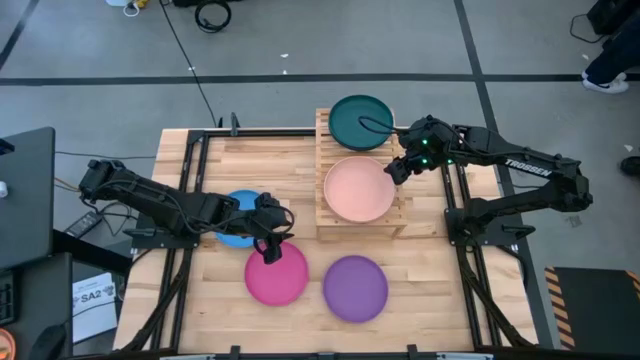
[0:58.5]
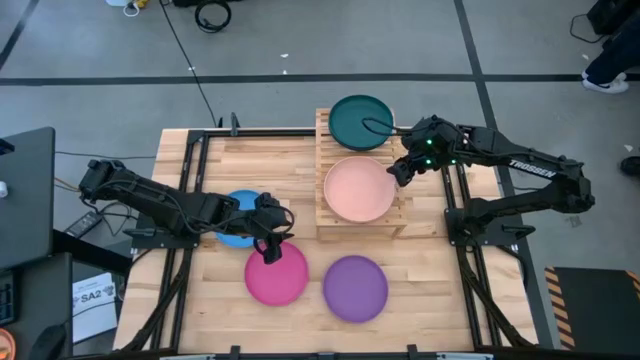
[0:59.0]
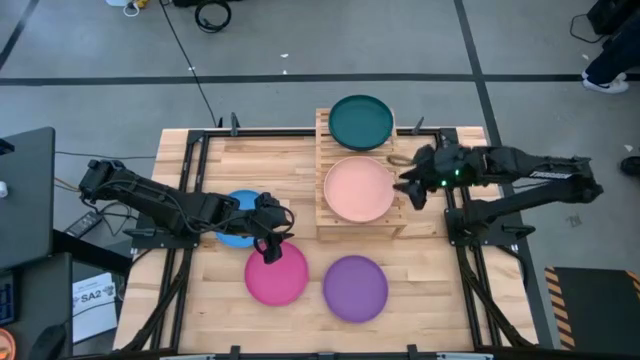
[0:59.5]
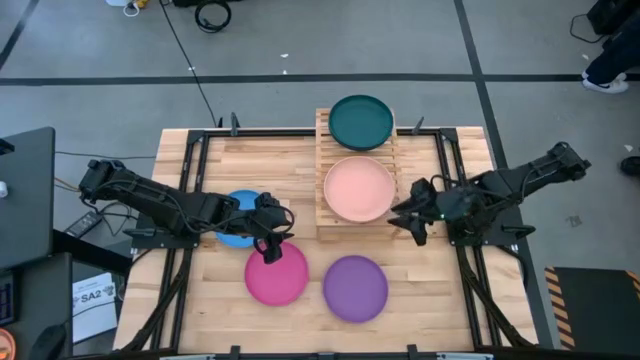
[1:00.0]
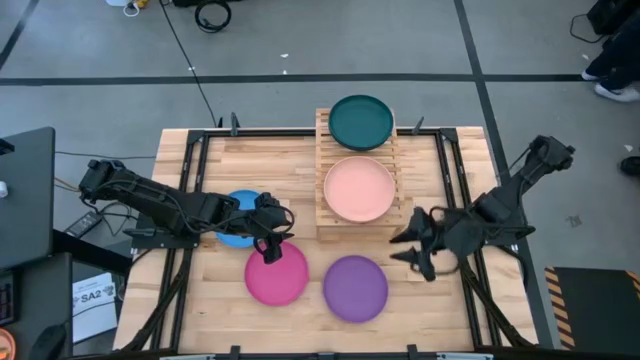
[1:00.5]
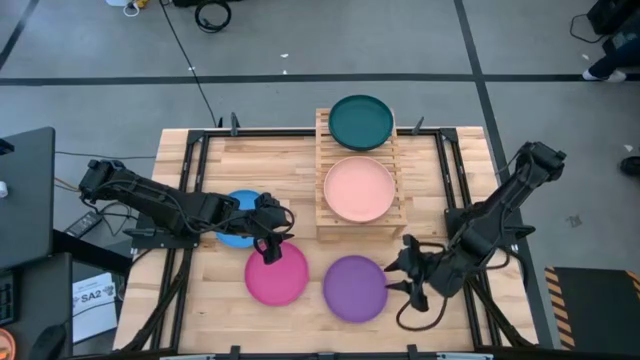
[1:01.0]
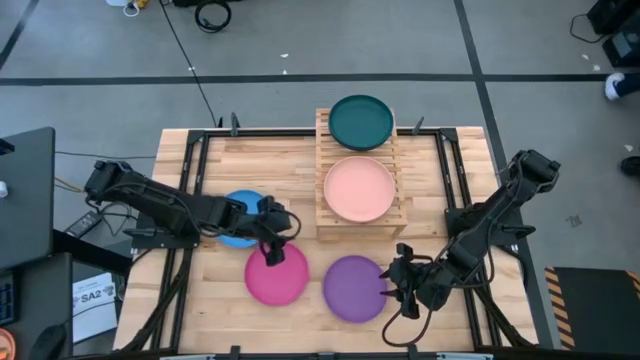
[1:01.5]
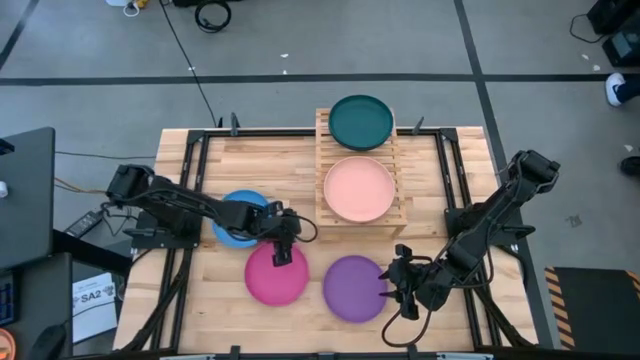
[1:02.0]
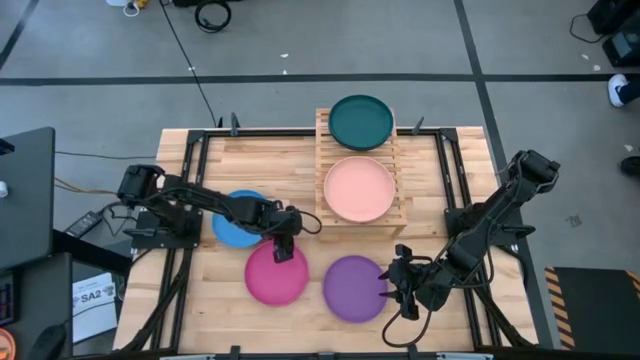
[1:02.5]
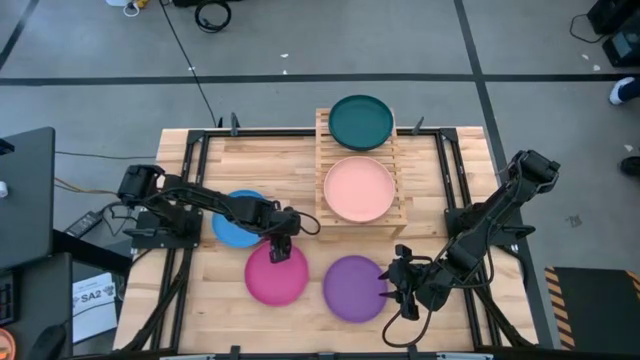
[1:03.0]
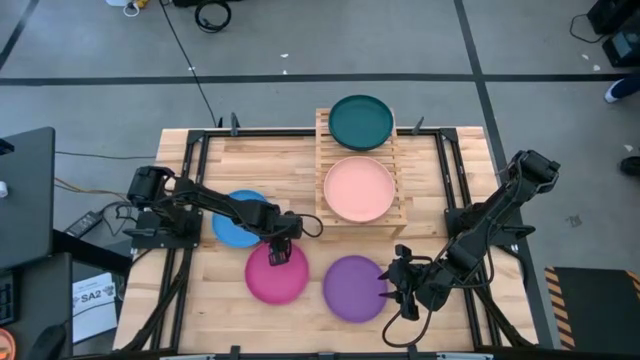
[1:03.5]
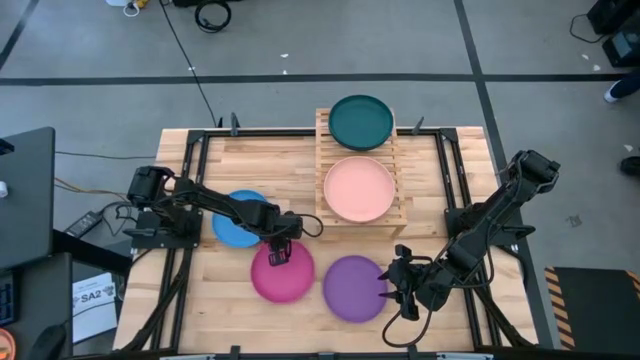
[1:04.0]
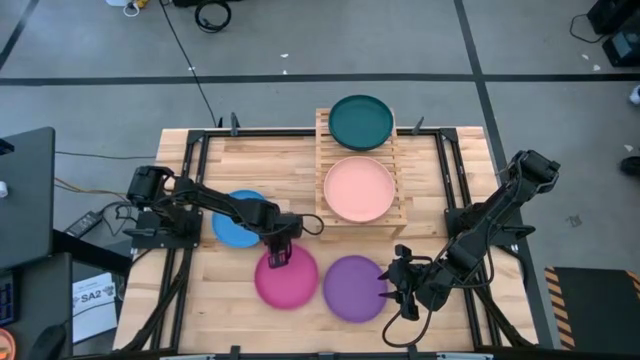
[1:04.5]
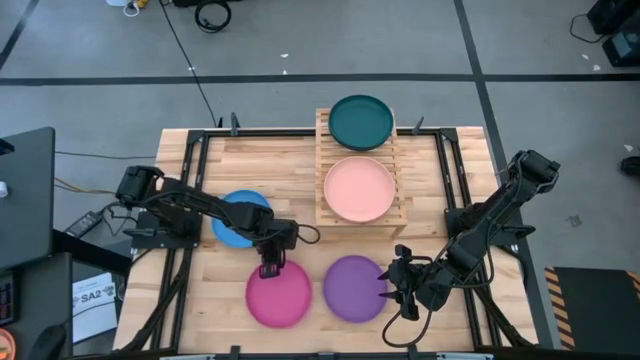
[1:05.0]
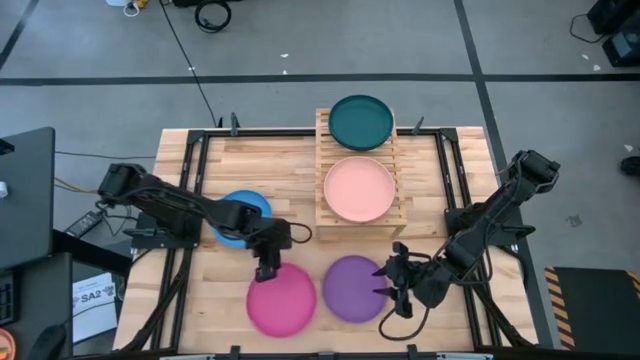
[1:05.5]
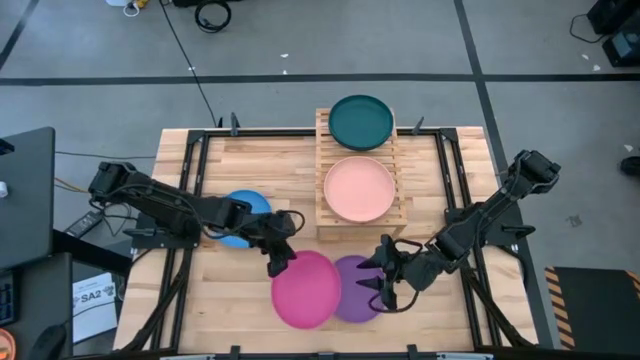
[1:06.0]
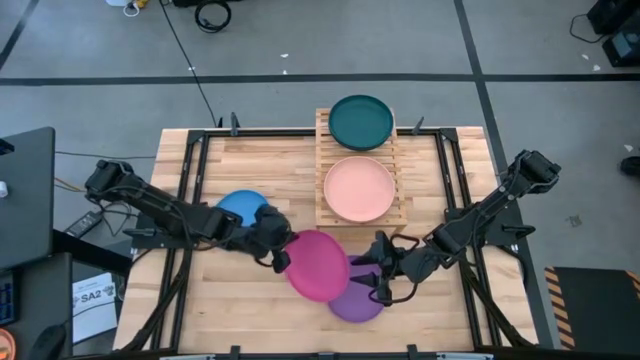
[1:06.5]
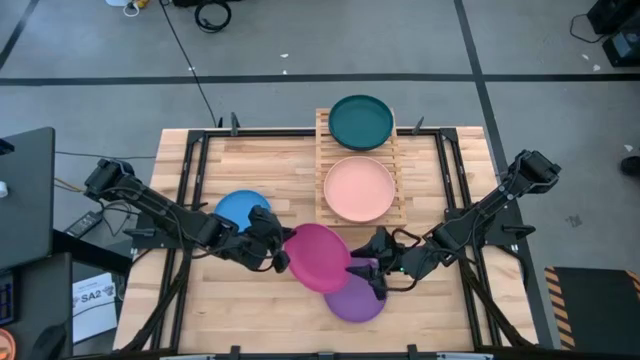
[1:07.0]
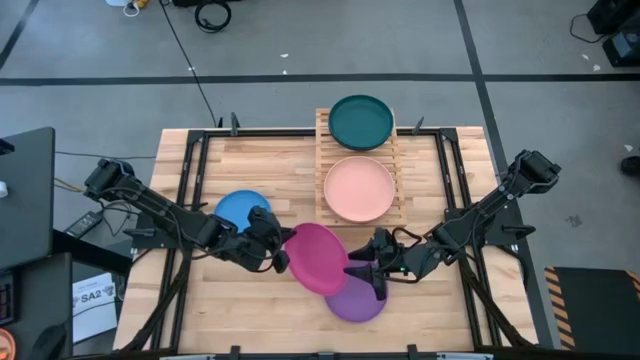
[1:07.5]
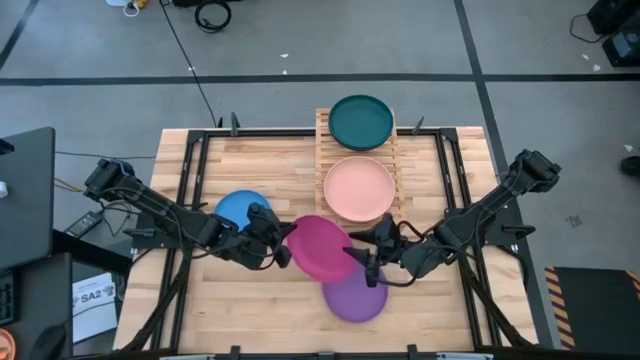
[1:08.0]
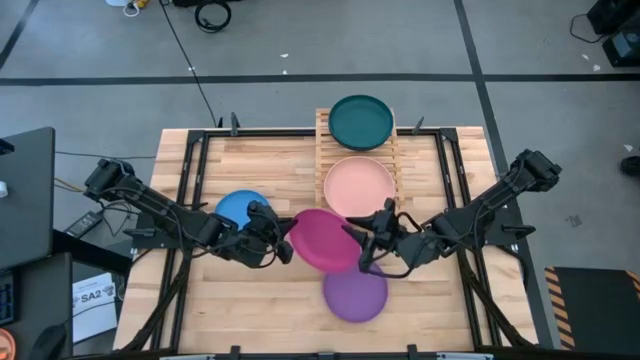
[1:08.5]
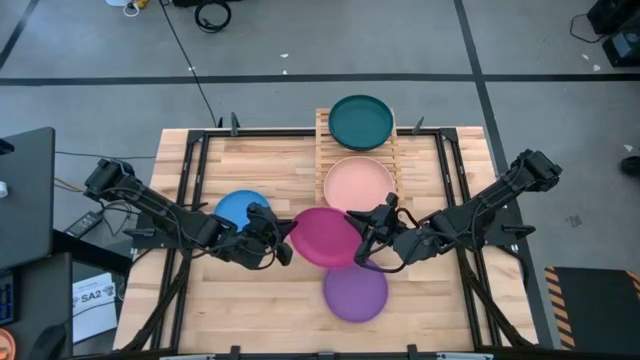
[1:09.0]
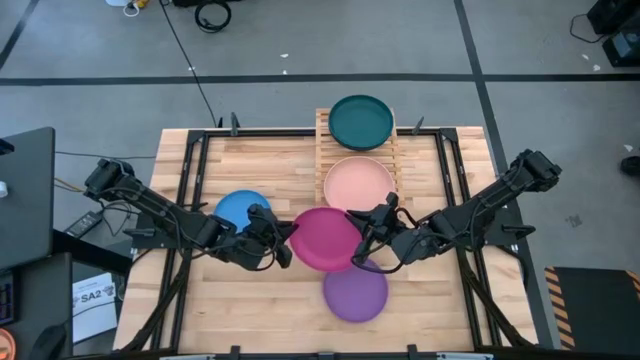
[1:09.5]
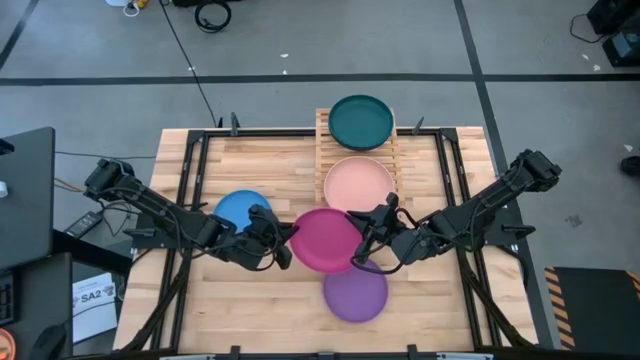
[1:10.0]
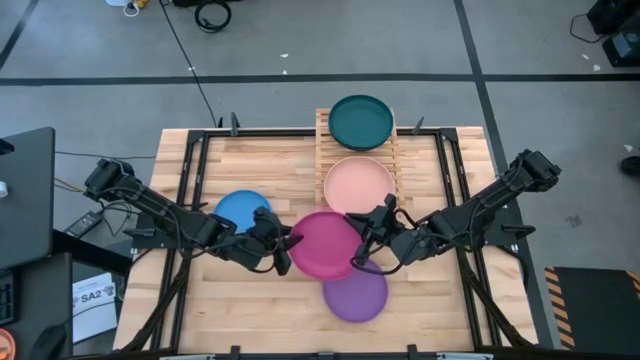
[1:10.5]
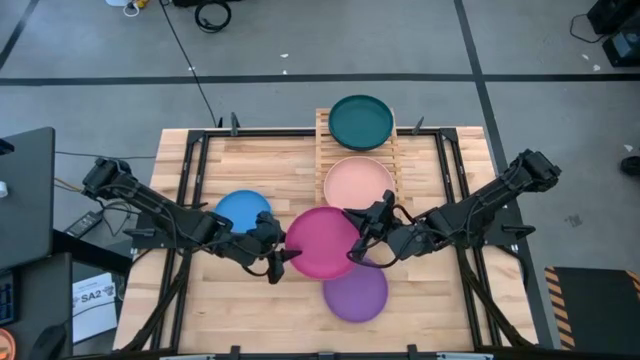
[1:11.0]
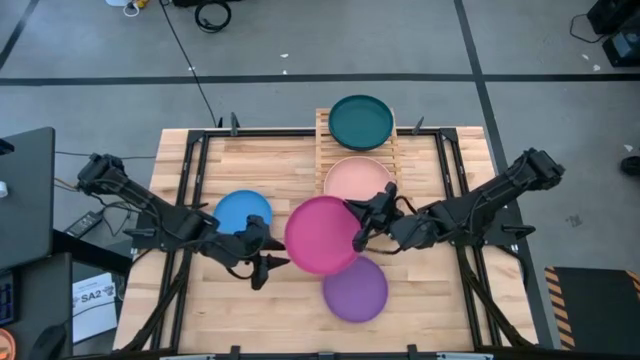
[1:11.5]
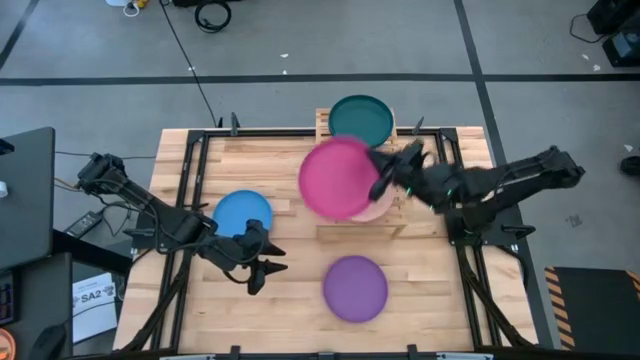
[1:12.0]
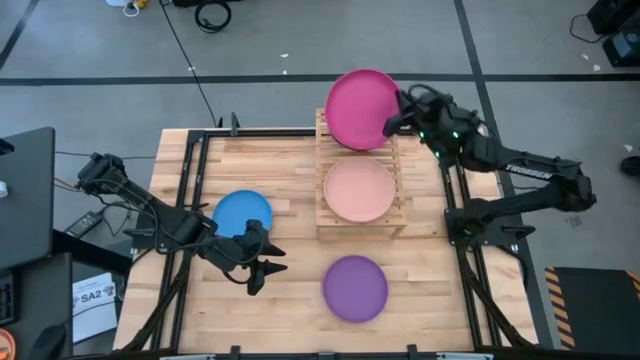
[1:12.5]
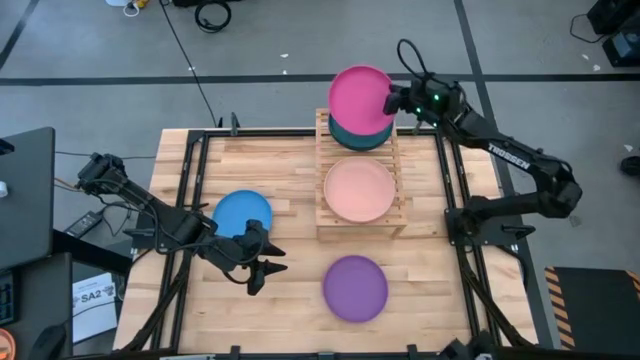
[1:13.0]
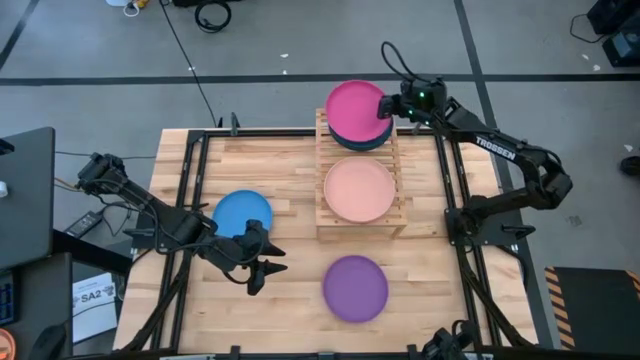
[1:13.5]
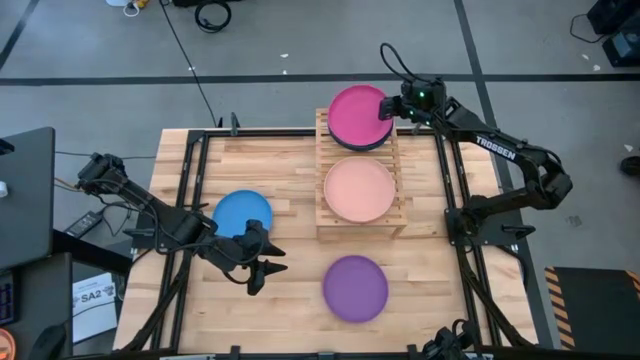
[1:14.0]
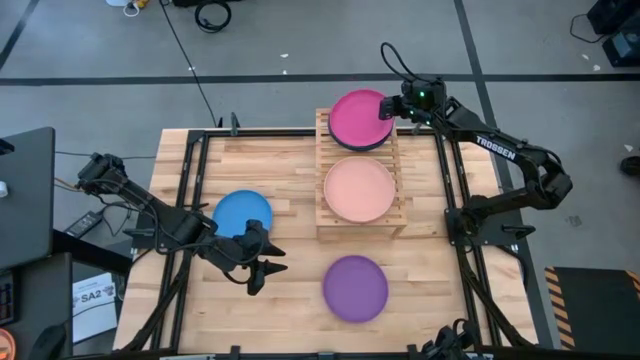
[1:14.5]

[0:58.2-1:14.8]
Task: Place and stack plates onto a shelf
Stack the pink plate on top of the dark green plate

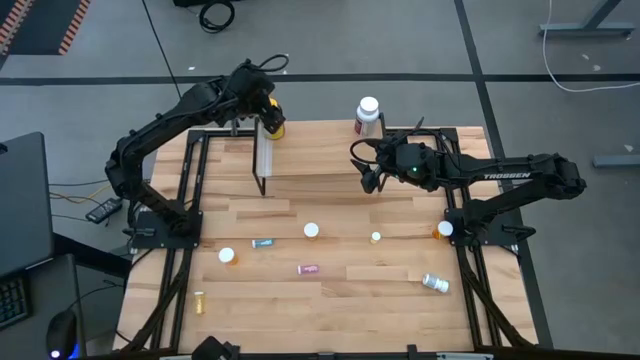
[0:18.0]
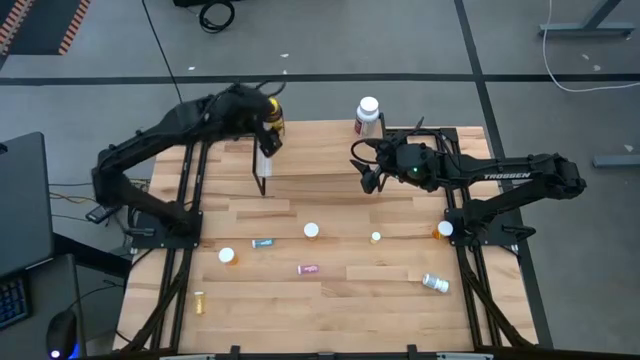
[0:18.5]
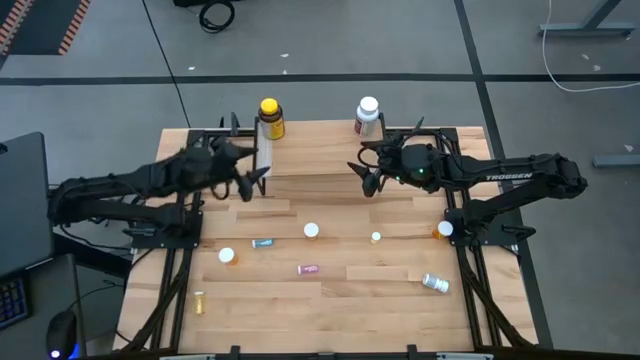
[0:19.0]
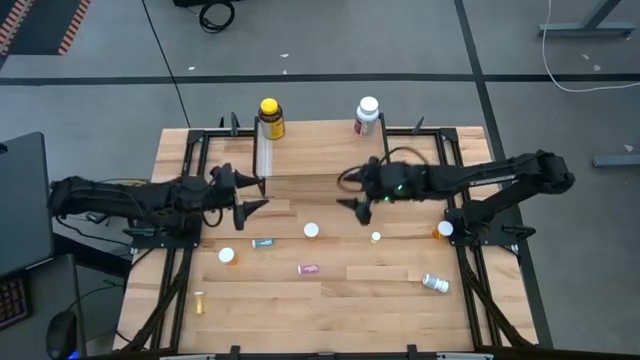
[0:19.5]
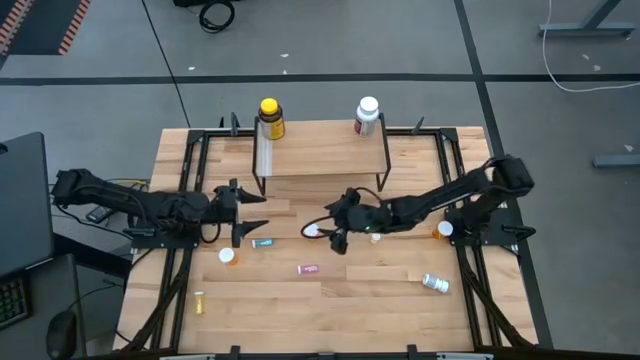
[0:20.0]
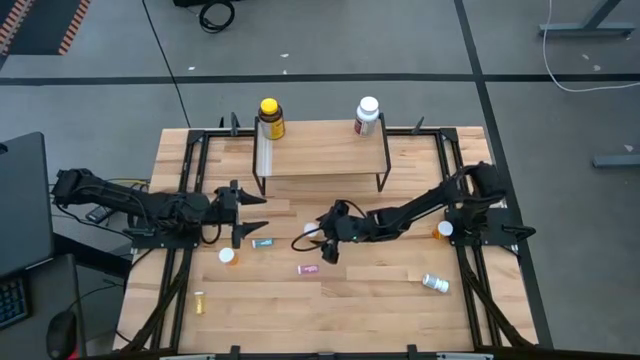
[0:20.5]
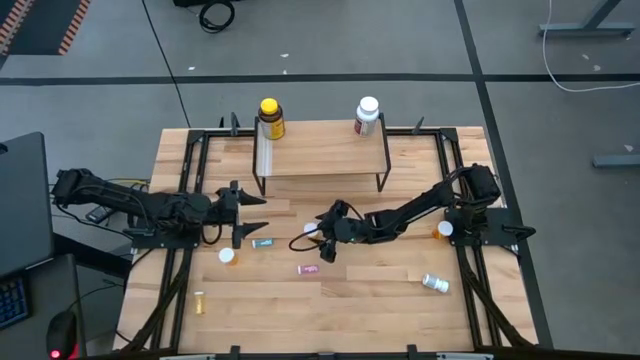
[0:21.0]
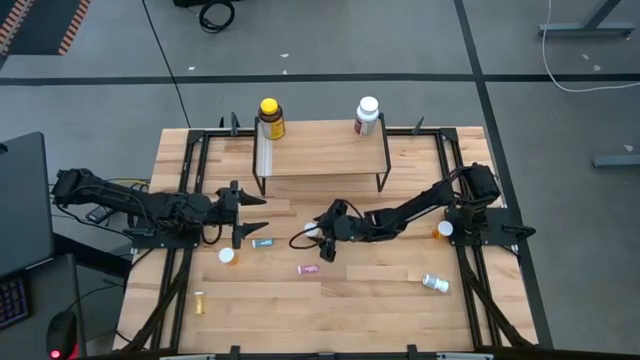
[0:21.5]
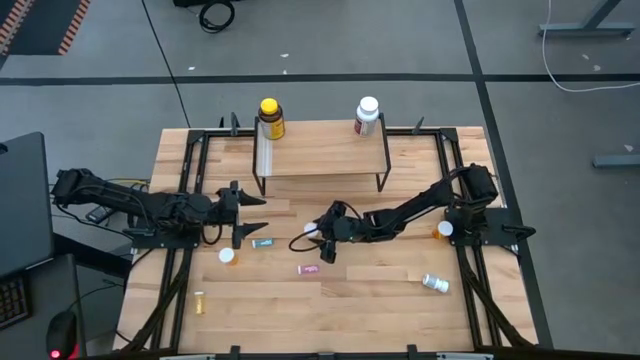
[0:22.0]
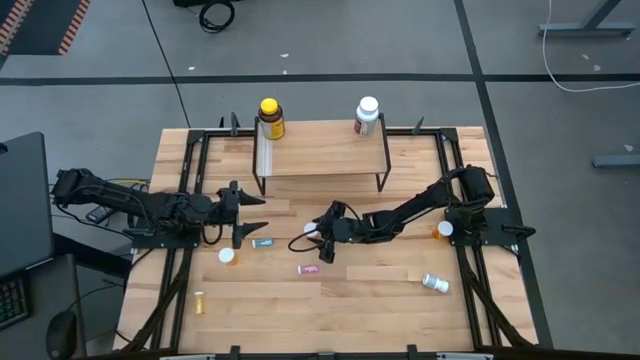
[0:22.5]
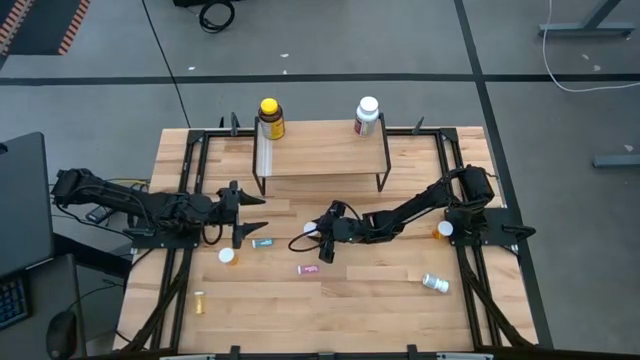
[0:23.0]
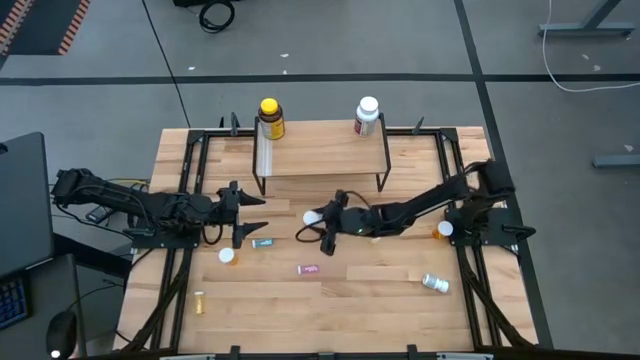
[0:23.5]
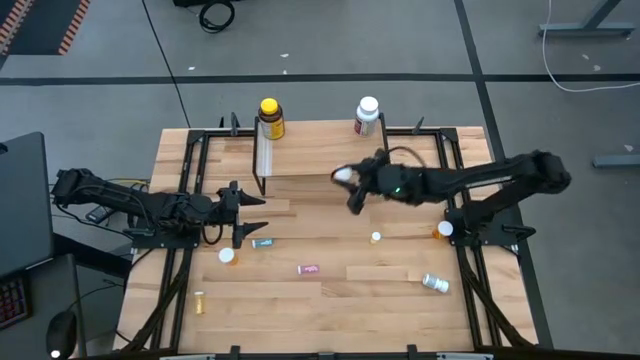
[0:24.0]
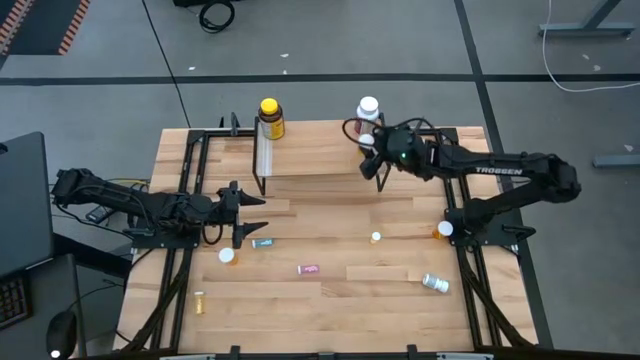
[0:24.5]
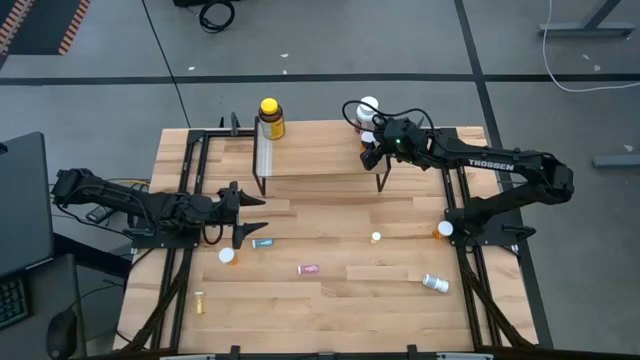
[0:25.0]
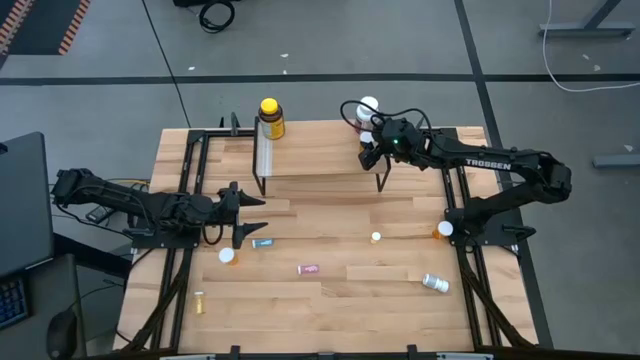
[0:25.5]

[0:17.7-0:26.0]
Task: Pick and place medicine bottles onto shelf by color
Put the middle large orange pill bottle on the shelf
